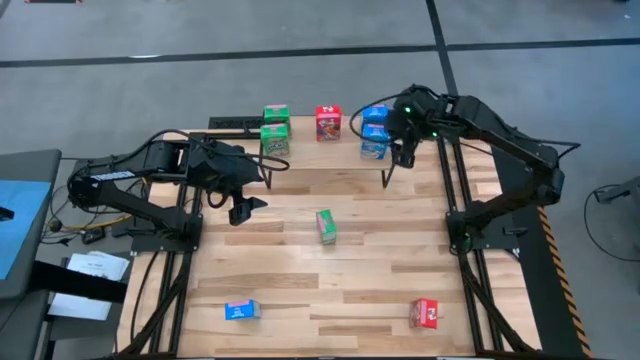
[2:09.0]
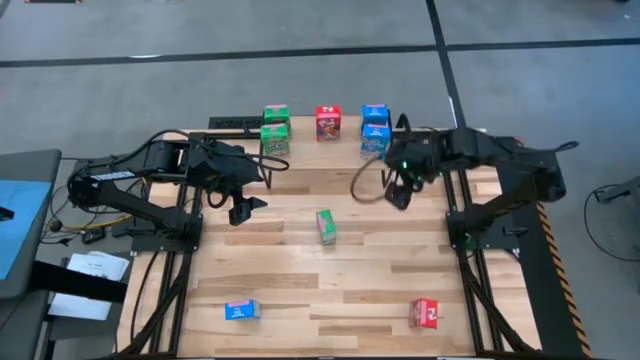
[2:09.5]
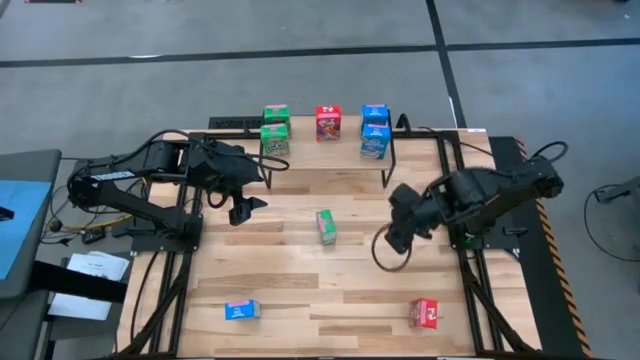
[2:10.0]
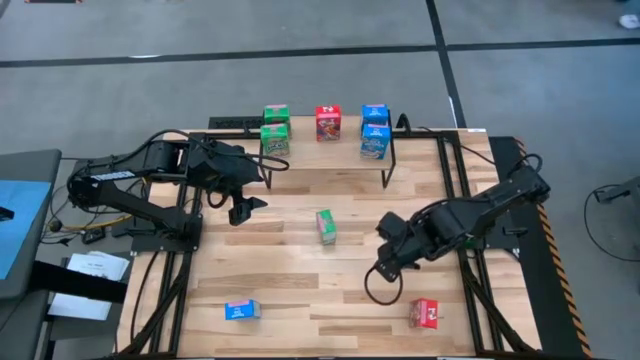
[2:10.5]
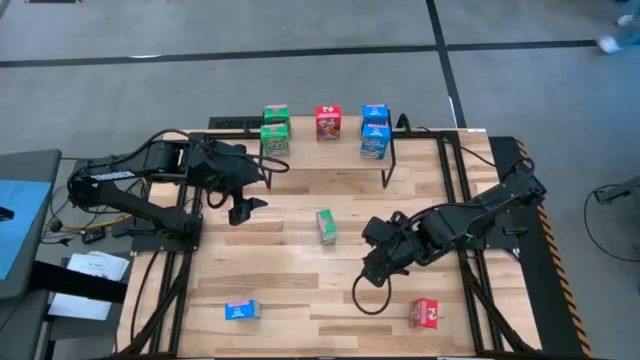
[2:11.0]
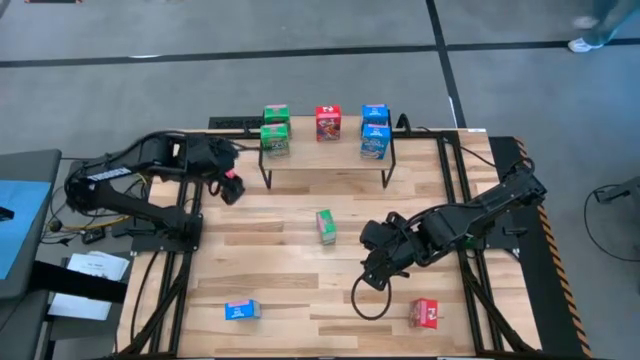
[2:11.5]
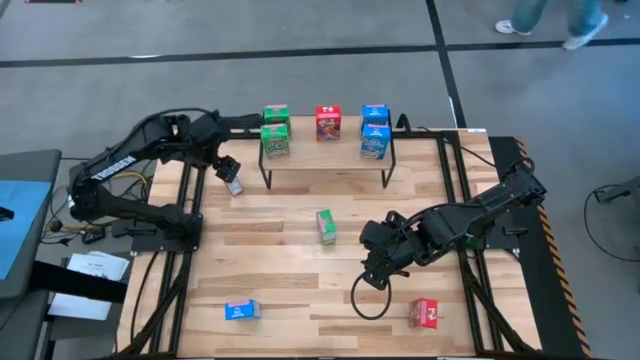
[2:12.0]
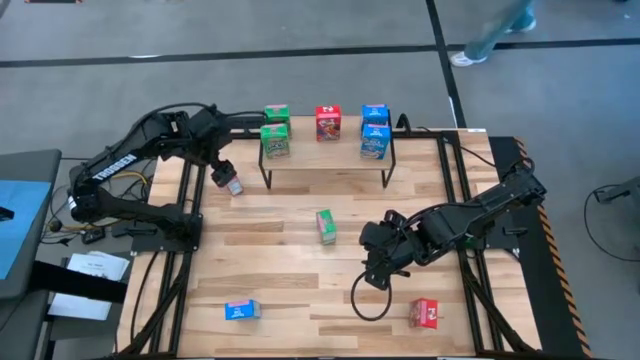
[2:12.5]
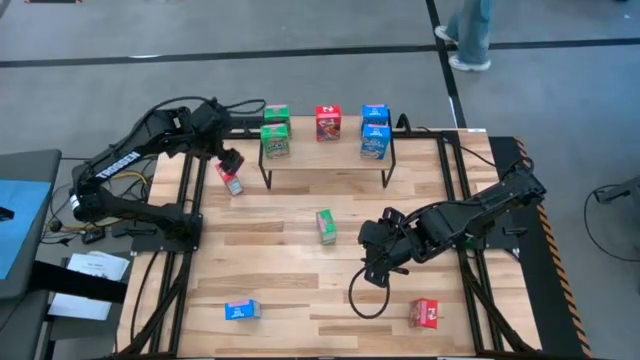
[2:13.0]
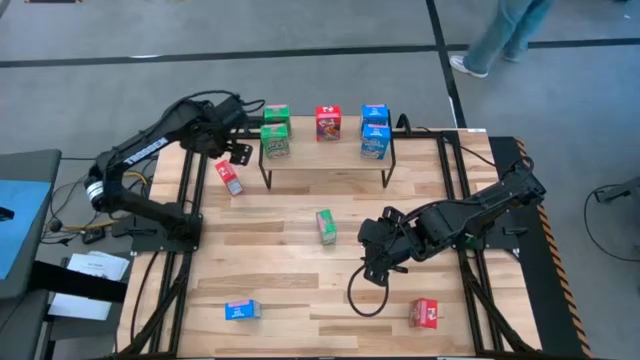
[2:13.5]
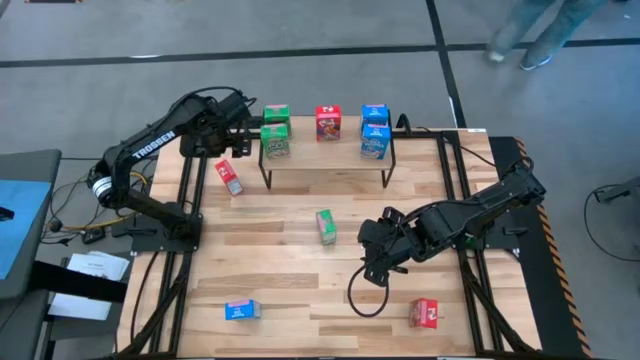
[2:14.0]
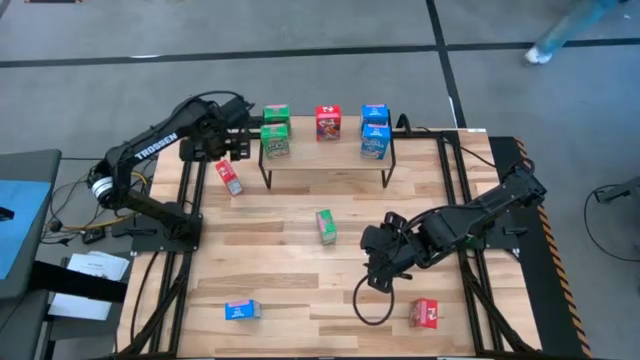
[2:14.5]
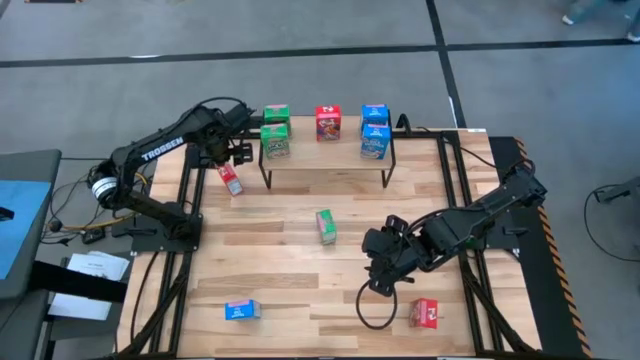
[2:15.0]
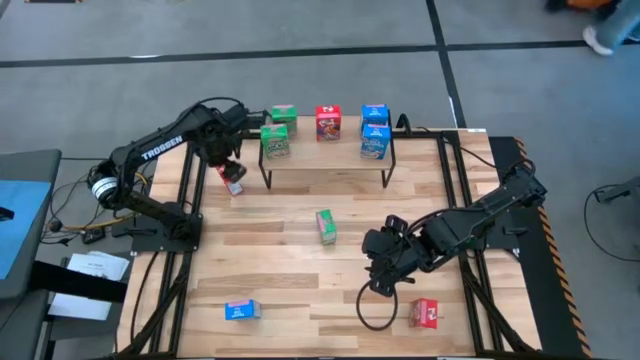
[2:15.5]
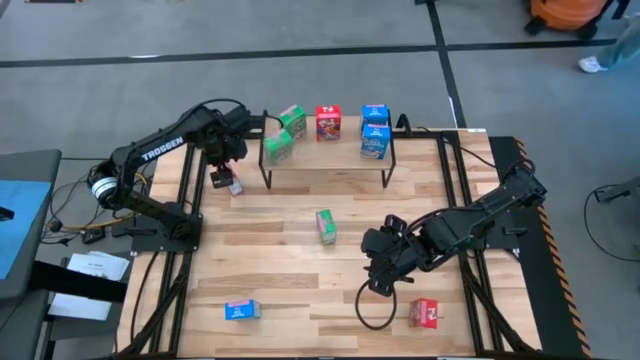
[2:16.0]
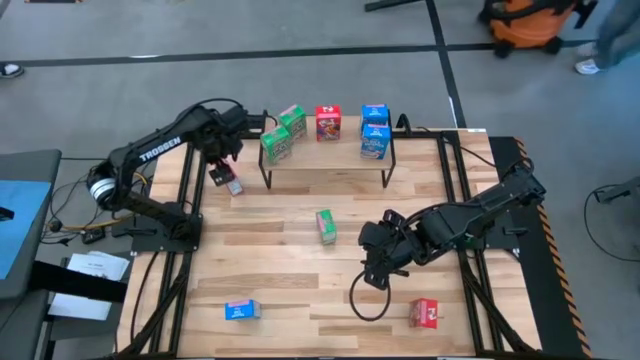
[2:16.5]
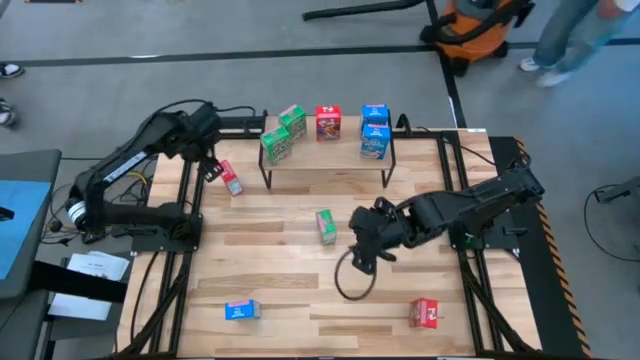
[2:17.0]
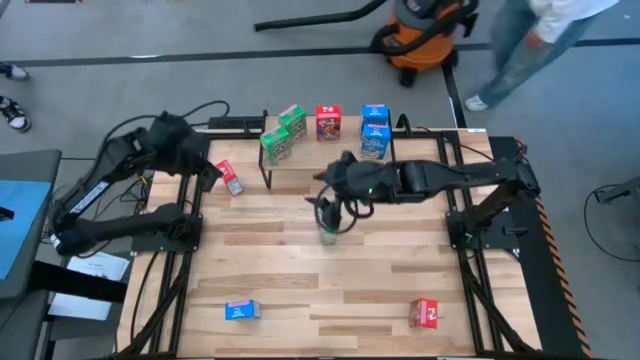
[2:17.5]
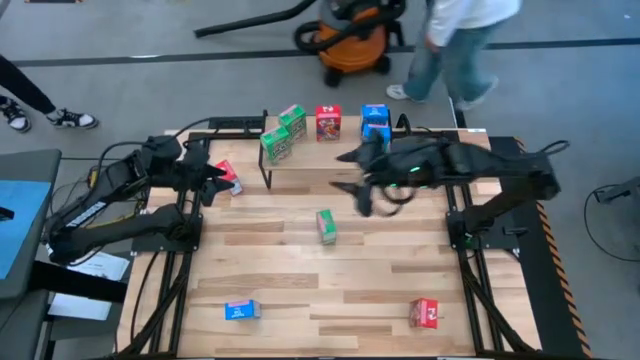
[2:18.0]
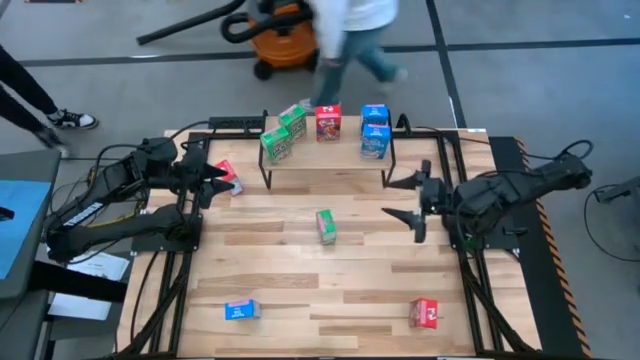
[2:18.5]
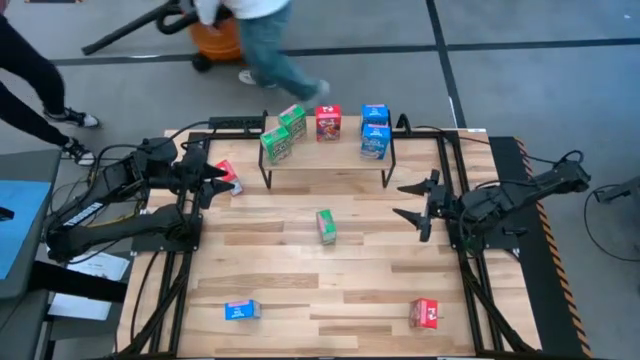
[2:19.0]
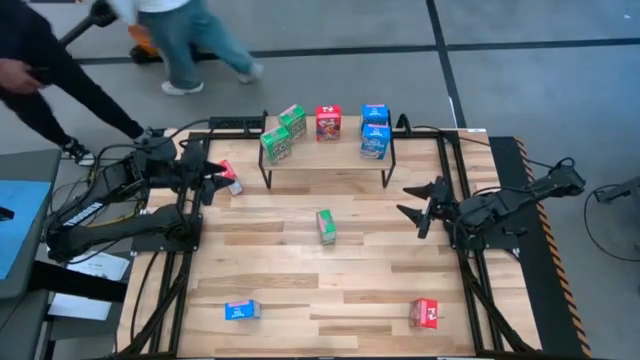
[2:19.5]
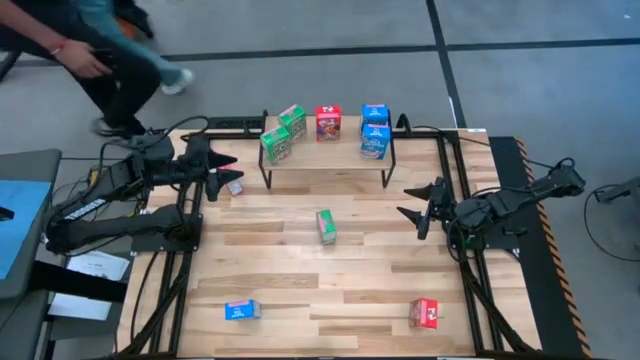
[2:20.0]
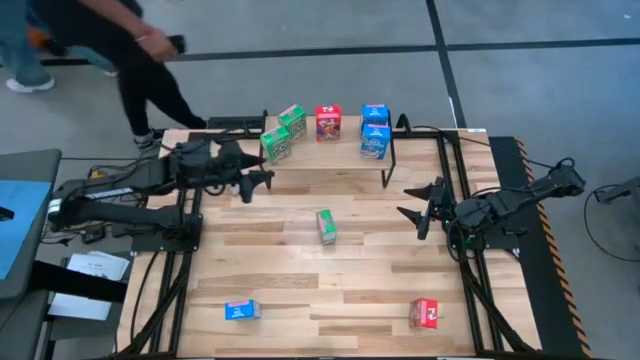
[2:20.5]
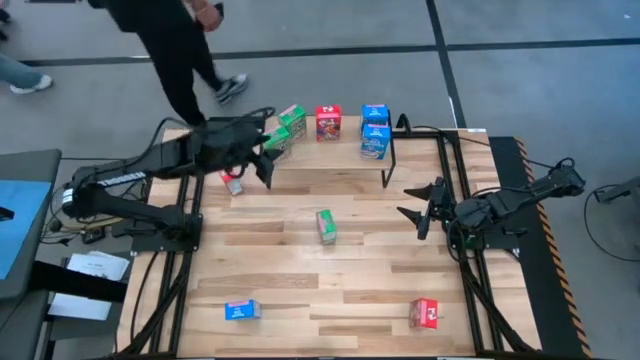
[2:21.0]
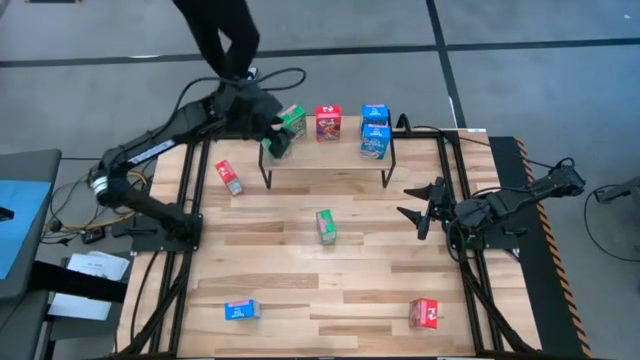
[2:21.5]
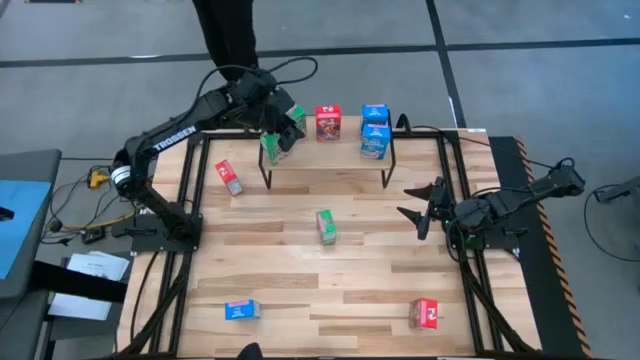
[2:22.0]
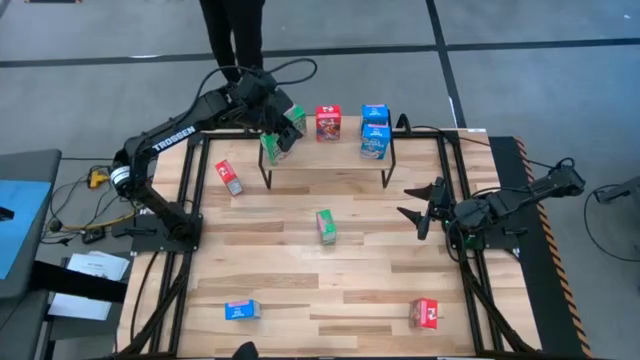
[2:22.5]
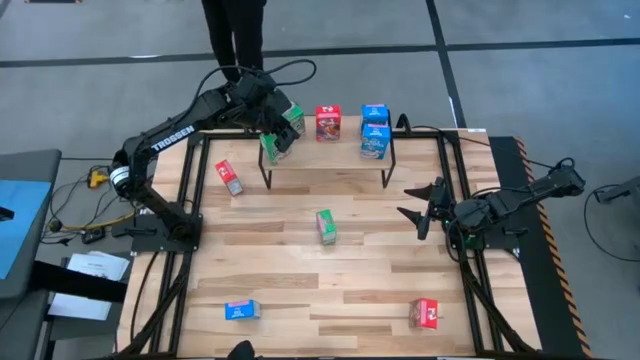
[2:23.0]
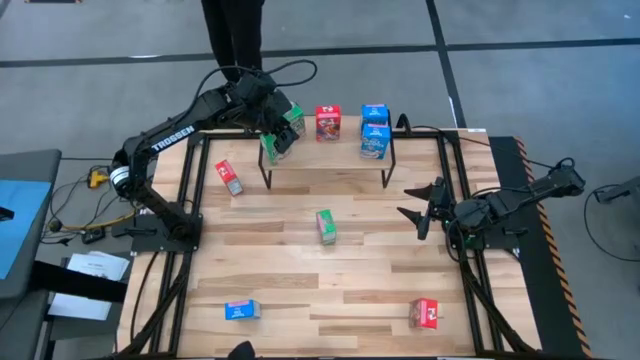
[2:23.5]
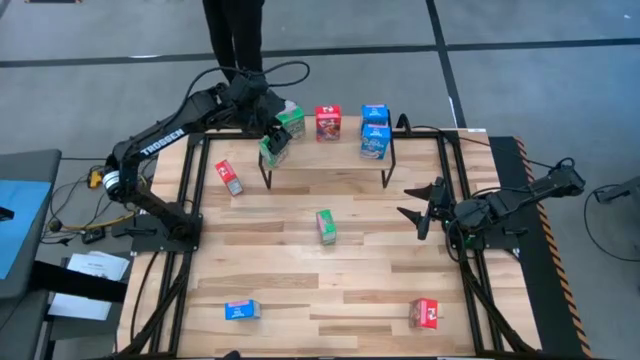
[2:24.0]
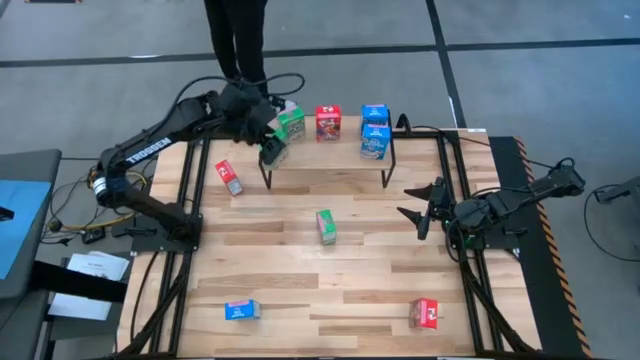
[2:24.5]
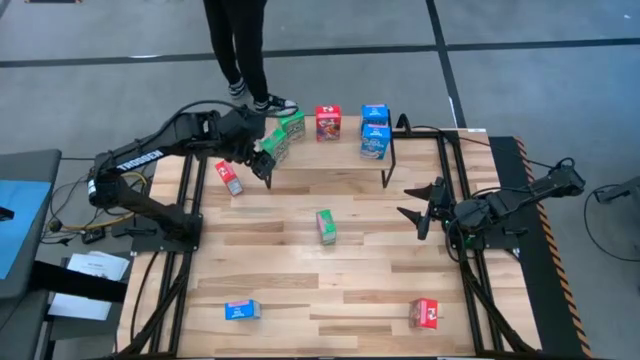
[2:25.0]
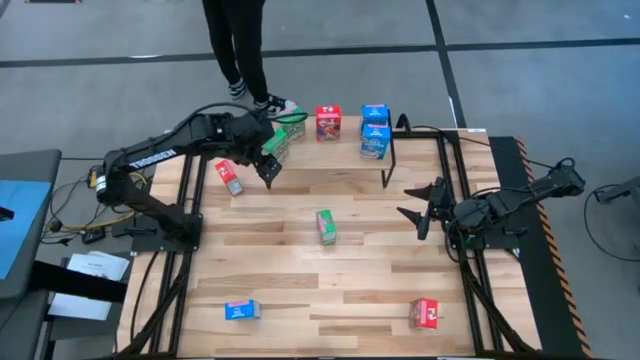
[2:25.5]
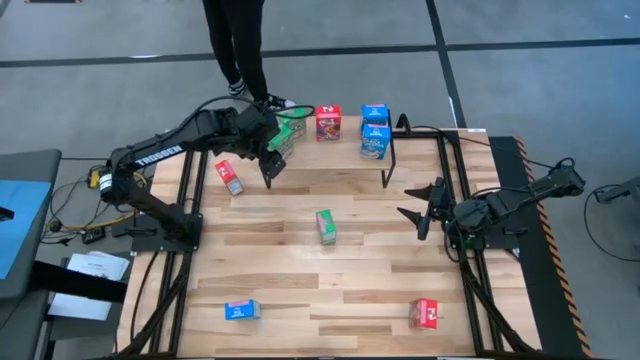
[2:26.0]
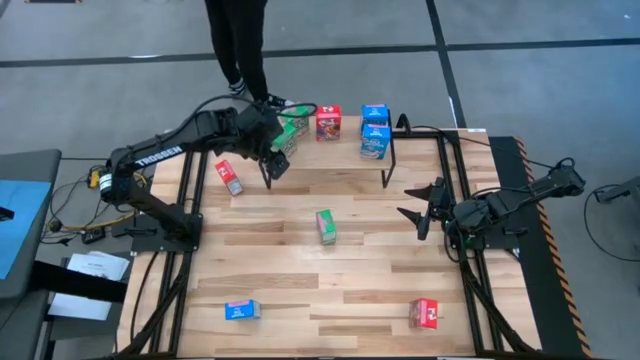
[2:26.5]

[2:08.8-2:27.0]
Task: Stack cereal on shelf
Adjust the green cereal boxes on the shelf

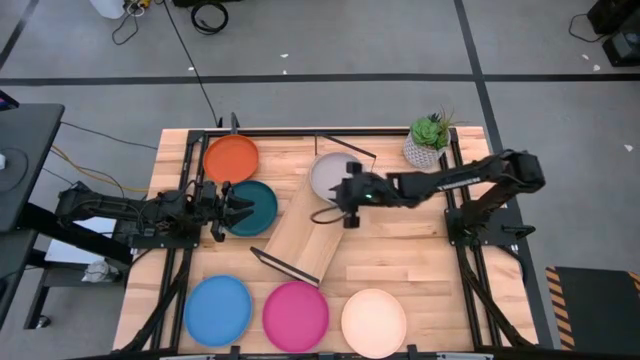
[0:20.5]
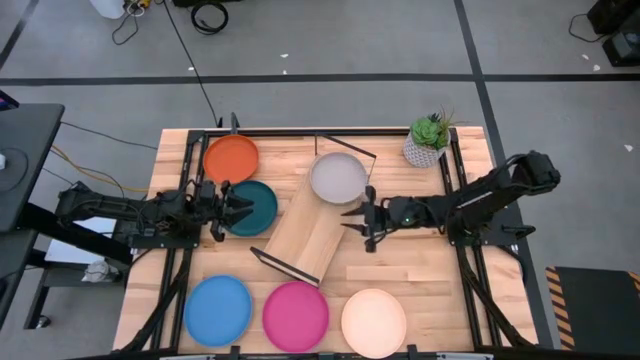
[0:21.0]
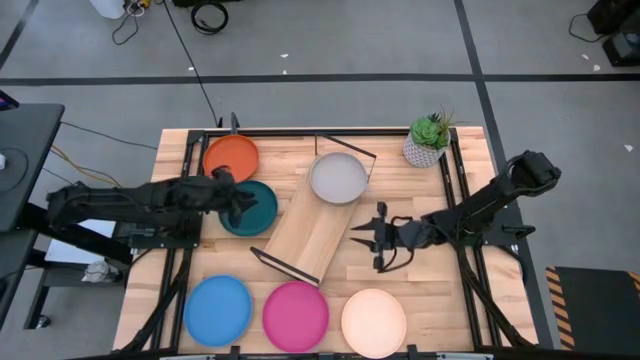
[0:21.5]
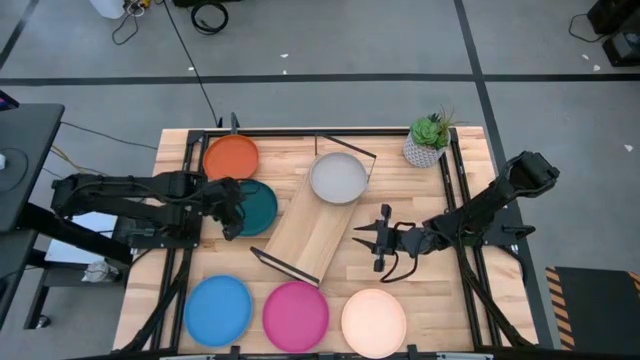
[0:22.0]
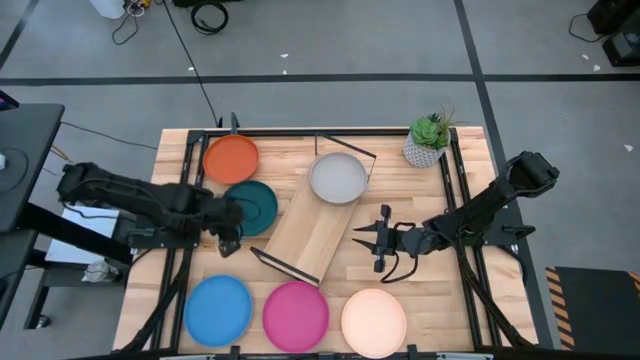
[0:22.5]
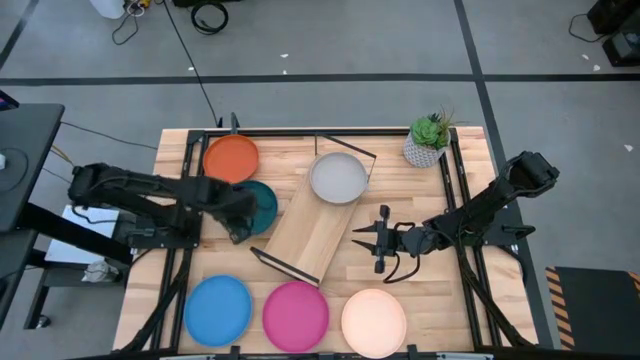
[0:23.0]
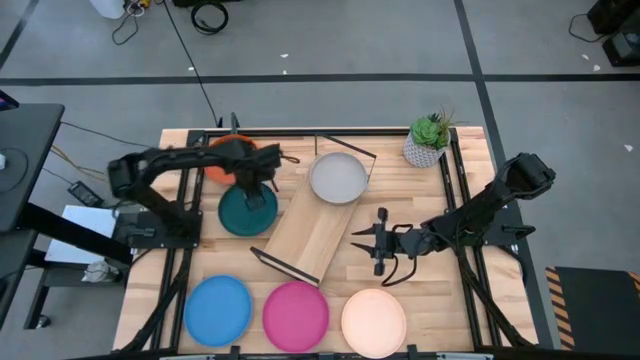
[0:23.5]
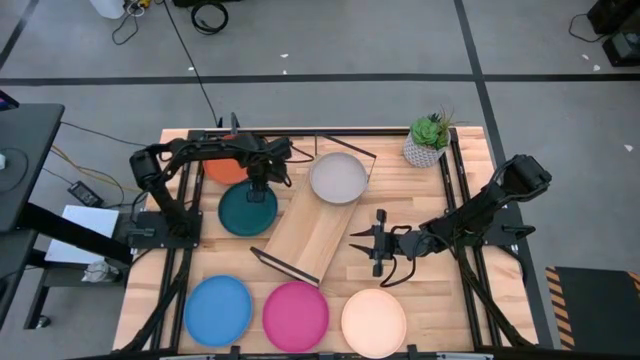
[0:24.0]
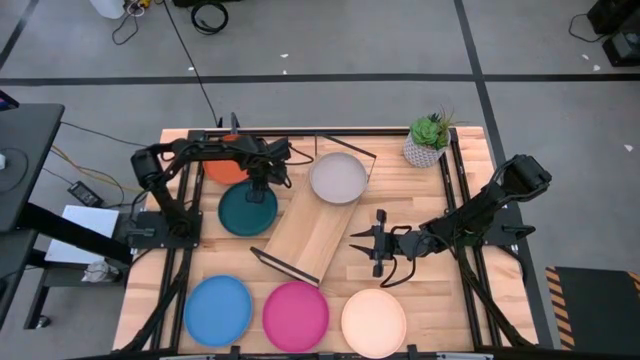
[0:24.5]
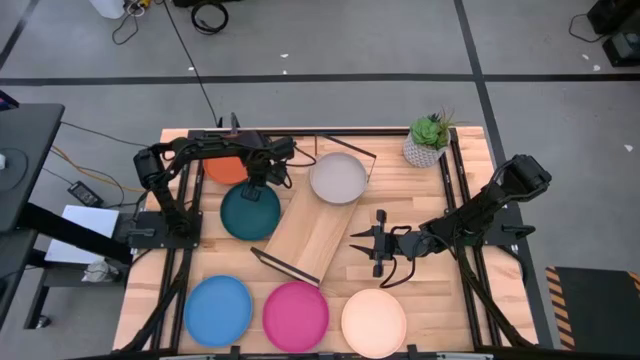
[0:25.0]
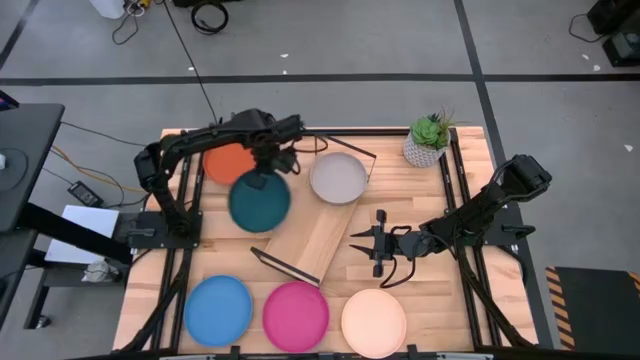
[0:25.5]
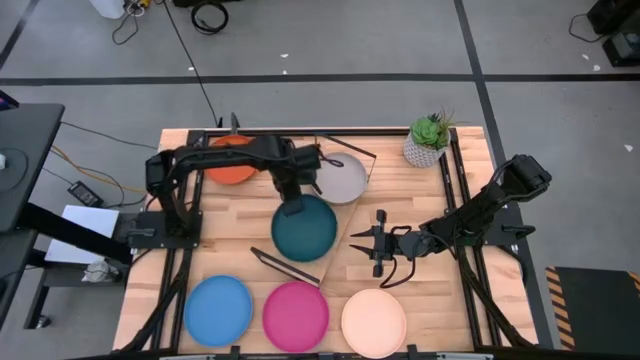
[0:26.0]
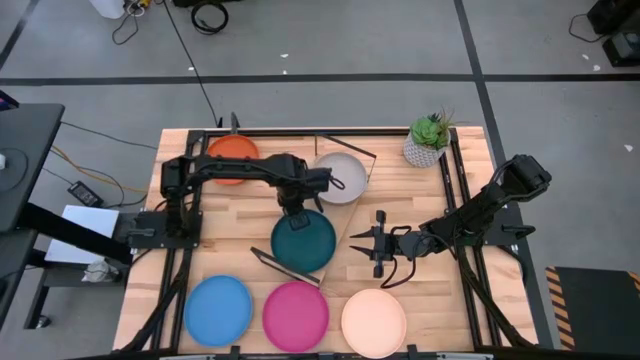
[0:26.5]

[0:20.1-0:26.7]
Task: Place and stack plates onto a shelf
Put the dark blue plate on the shelf
